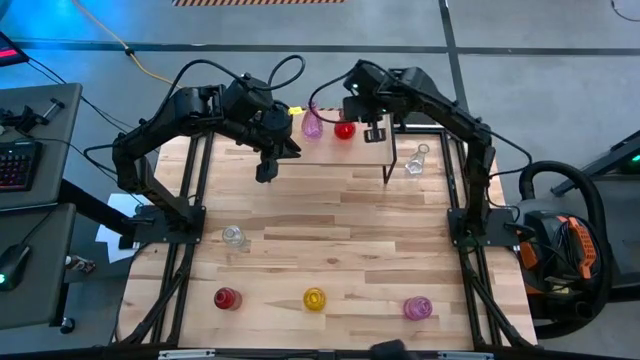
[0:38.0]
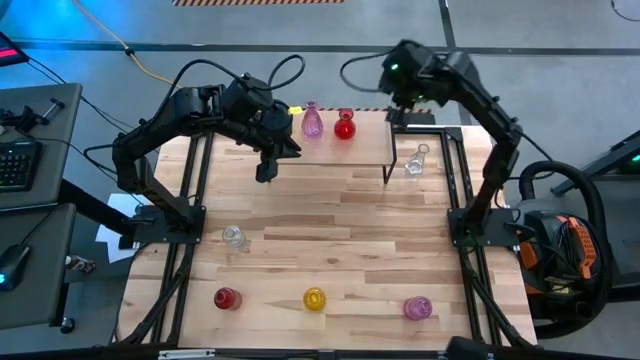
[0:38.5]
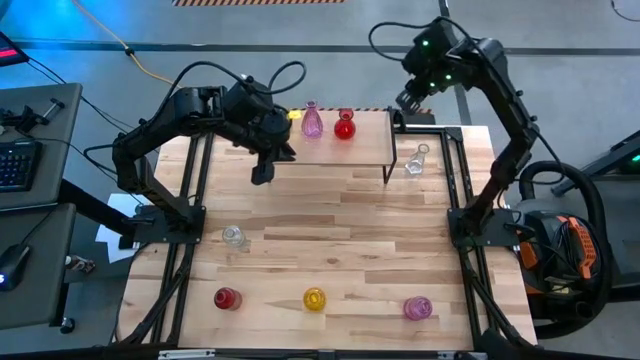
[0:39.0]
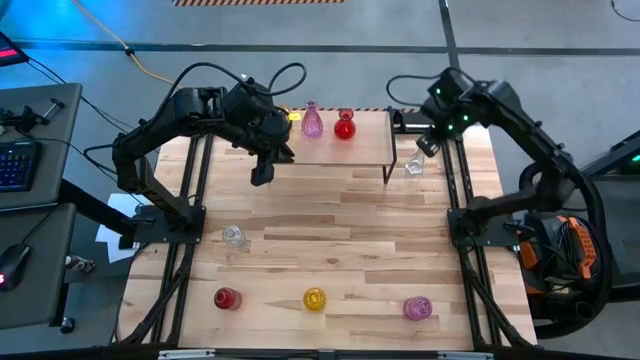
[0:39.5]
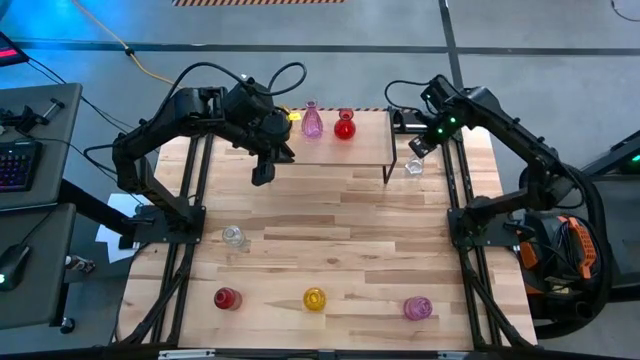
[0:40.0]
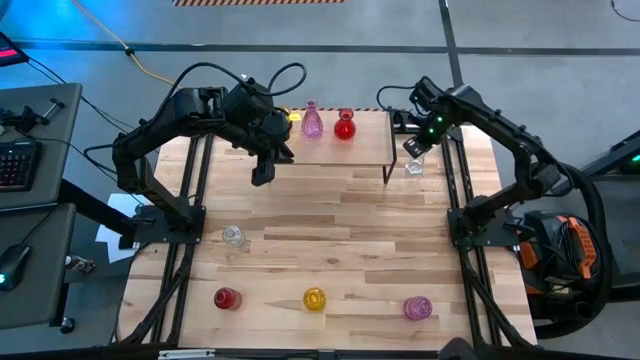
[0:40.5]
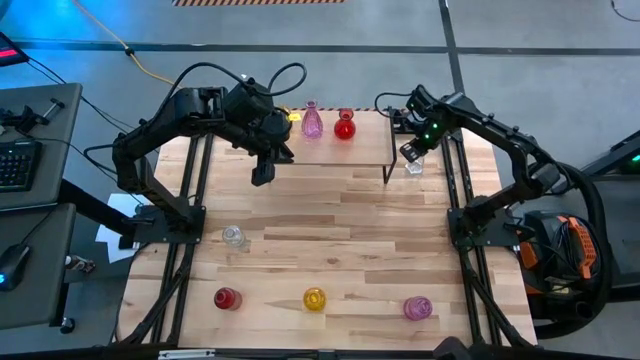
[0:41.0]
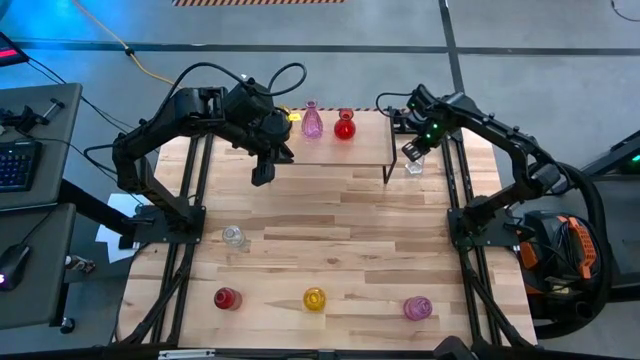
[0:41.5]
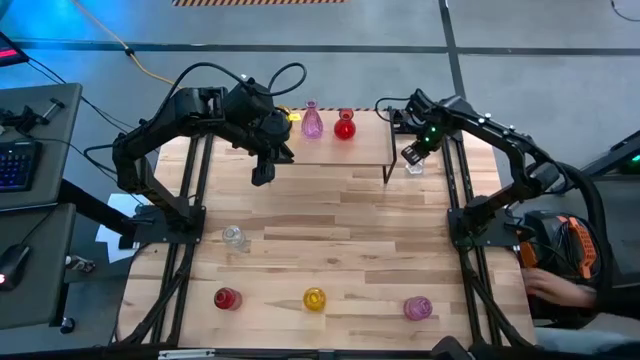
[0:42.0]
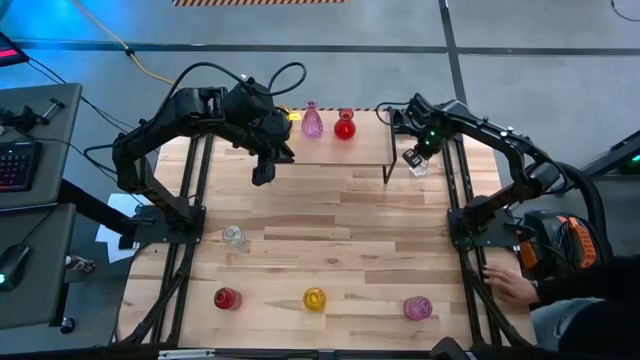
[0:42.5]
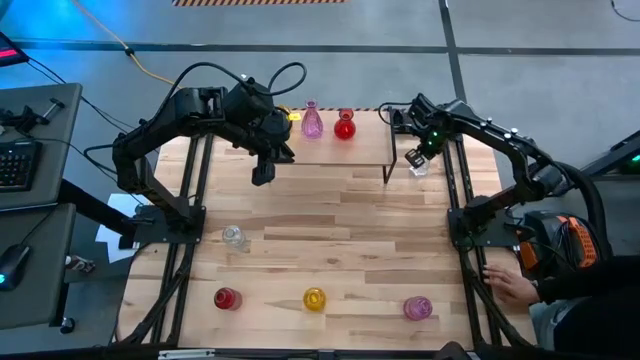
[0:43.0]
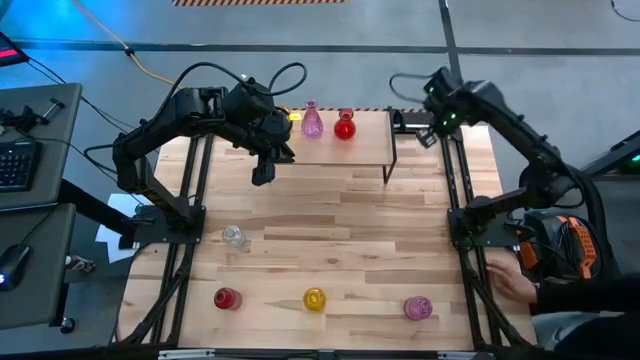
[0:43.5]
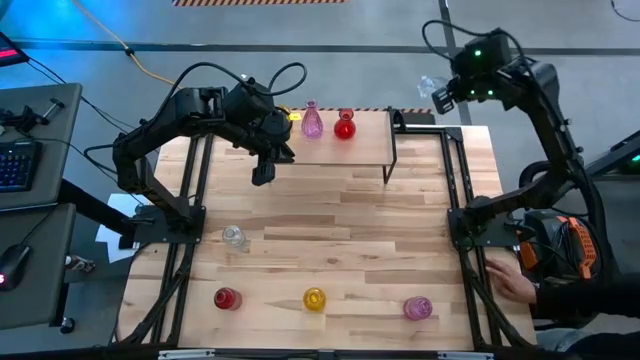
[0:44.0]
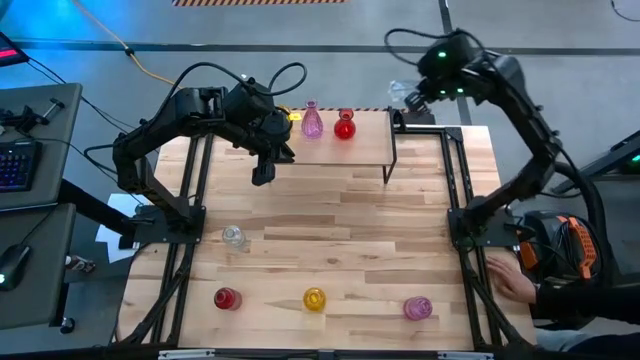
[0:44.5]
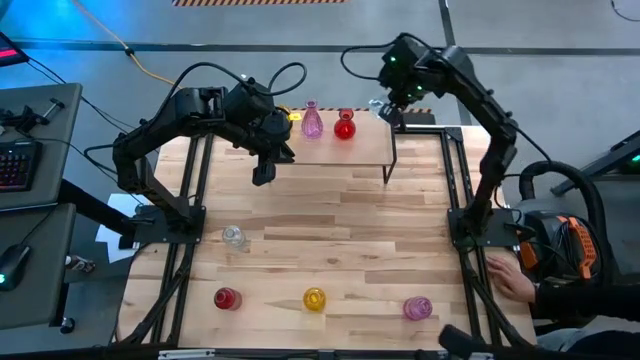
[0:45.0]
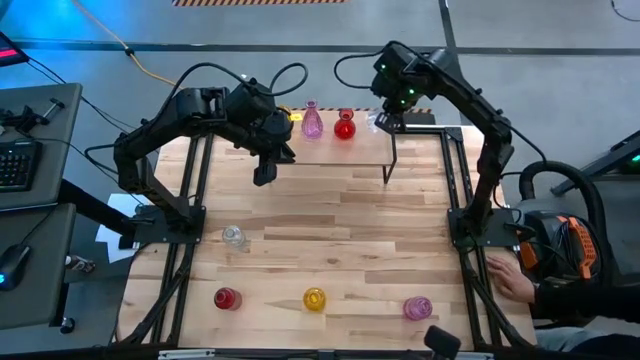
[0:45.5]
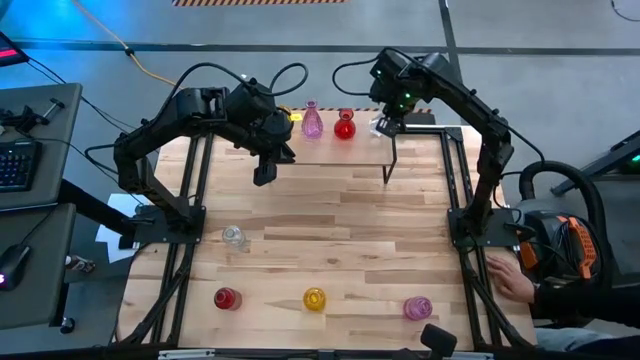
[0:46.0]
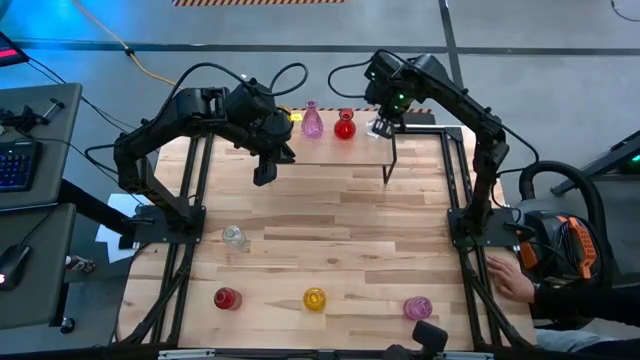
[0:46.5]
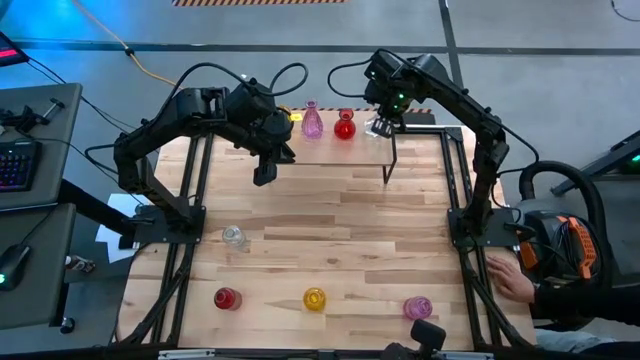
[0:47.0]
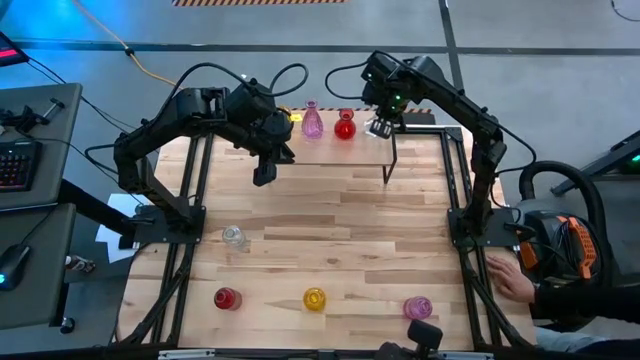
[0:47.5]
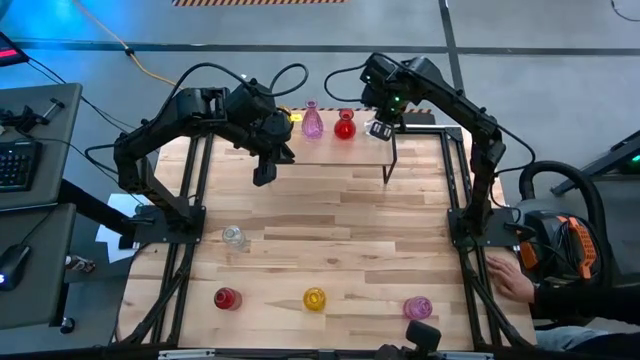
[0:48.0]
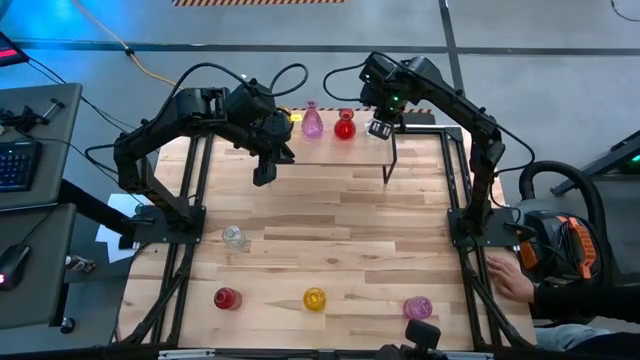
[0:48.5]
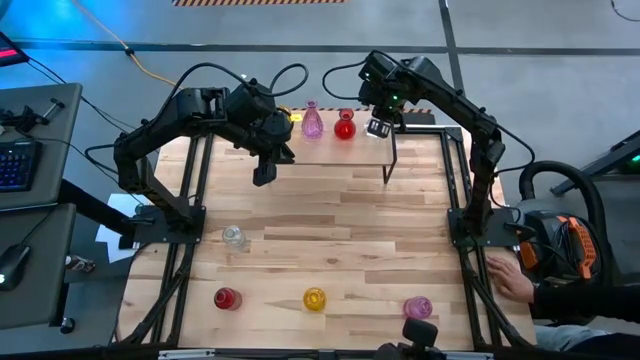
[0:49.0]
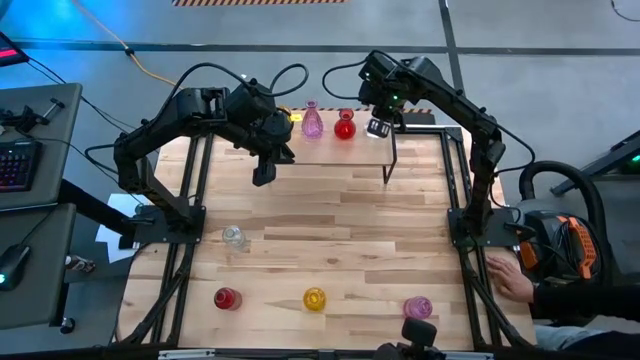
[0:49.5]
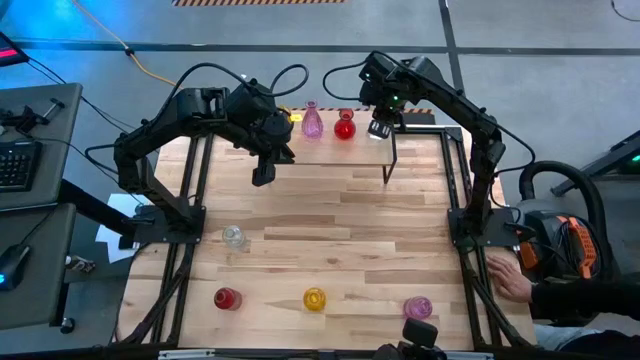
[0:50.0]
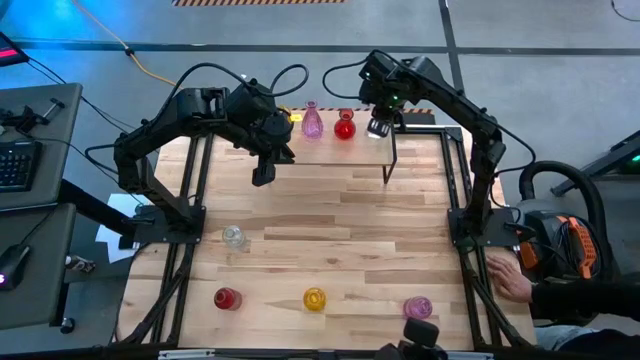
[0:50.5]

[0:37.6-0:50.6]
Task: sort vases onto shelf
Put the right transparent vase on the shelf

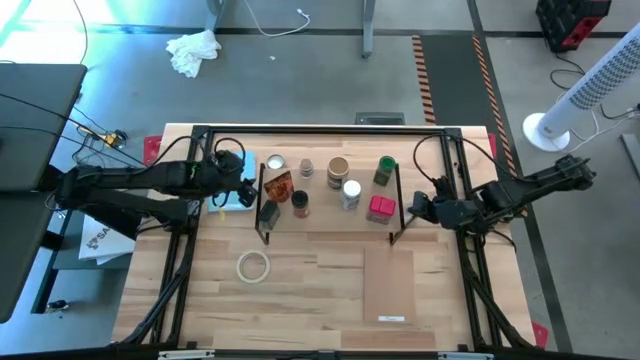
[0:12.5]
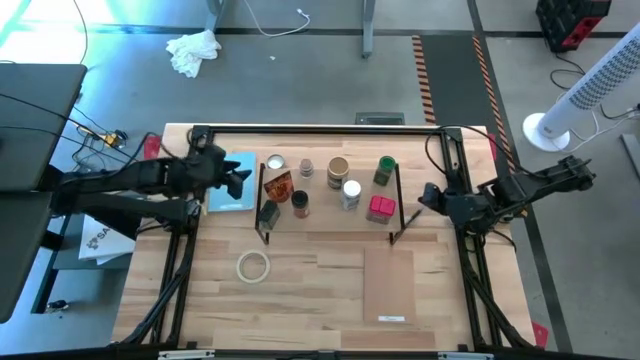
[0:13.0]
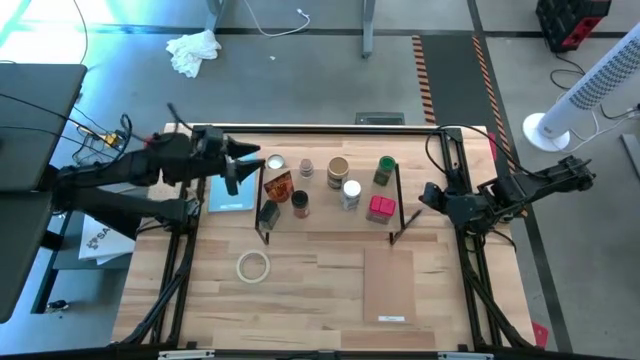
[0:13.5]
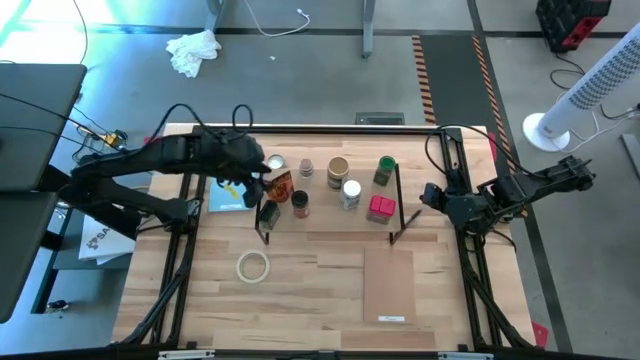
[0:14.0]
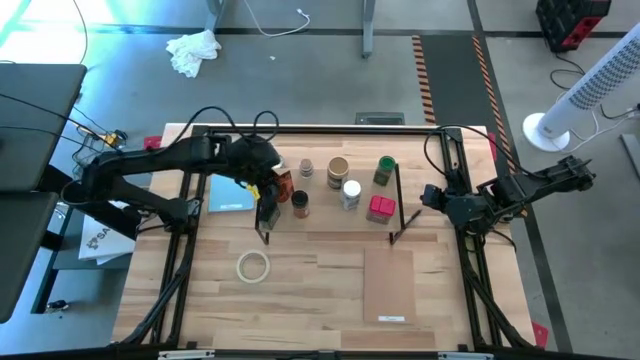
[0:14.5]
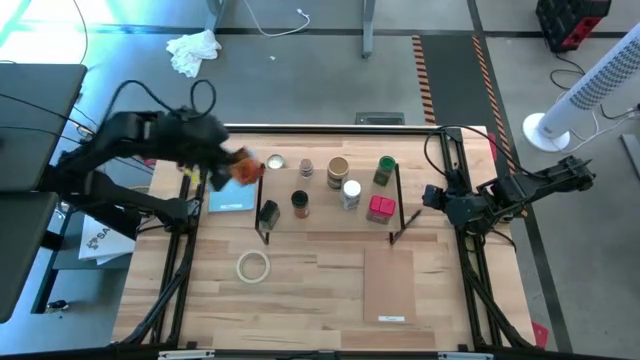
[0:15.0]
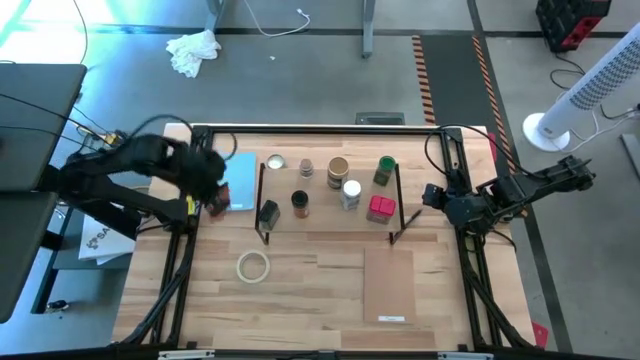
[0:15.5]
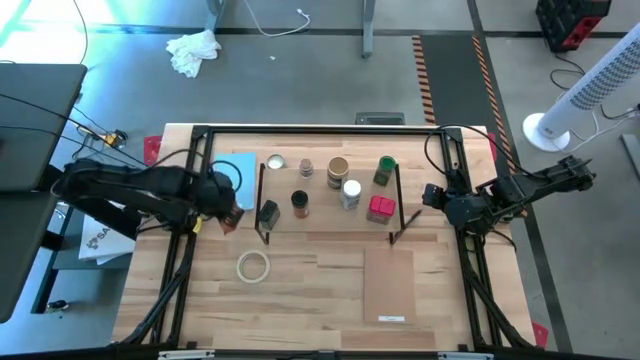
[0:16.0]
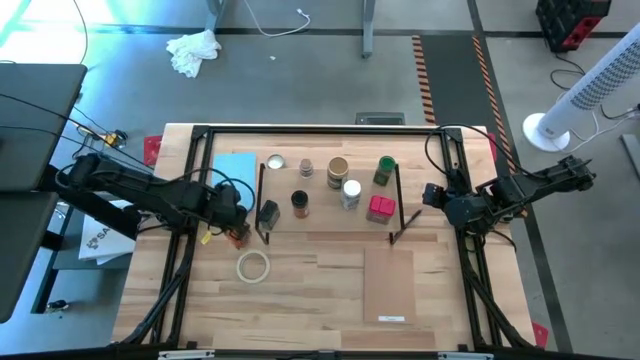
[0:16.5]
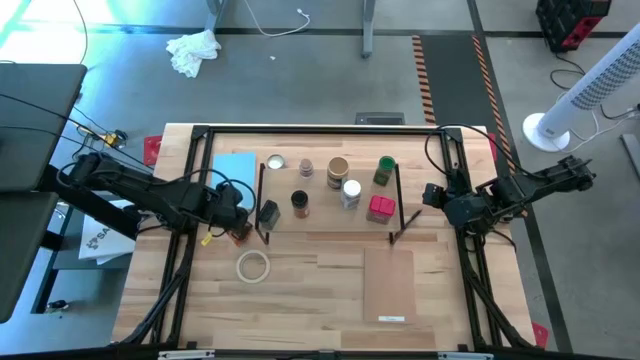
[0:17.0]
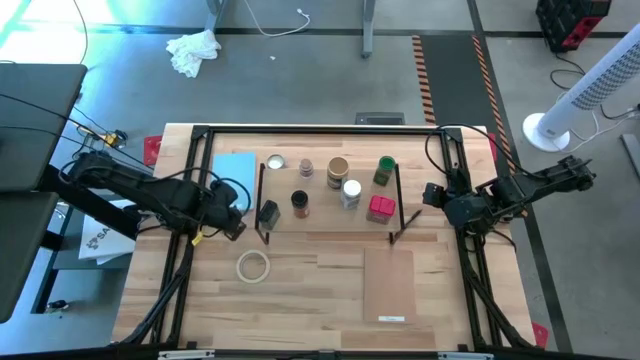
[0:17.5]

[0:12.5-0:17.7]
Task: Shelf spices
Remove the orange seasoning bag from the shelf
